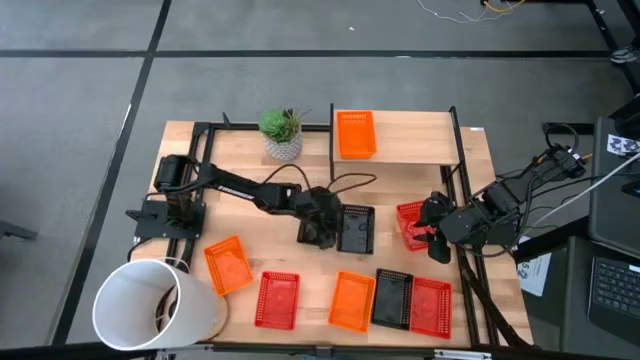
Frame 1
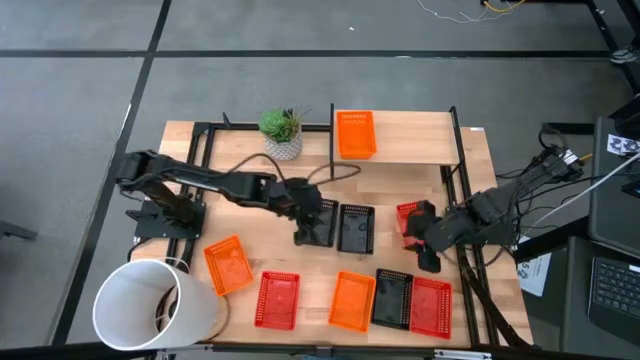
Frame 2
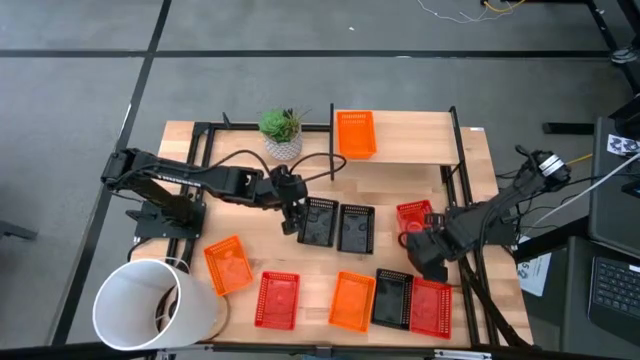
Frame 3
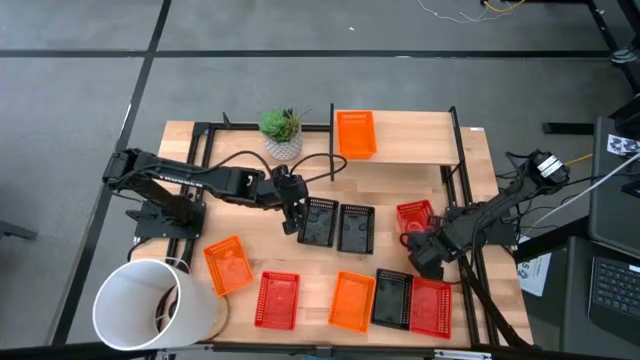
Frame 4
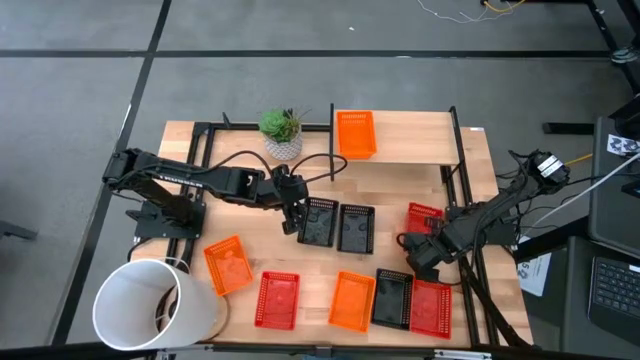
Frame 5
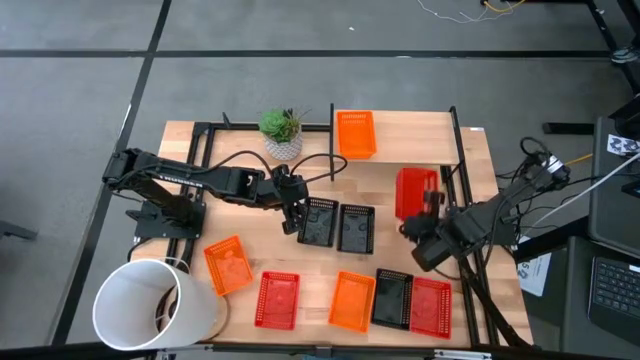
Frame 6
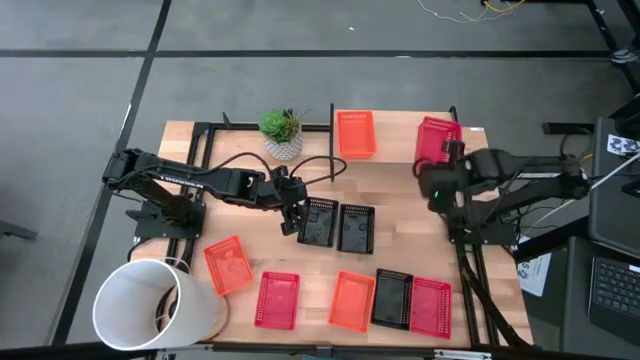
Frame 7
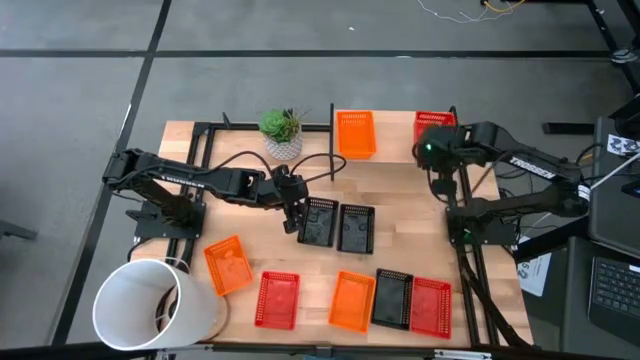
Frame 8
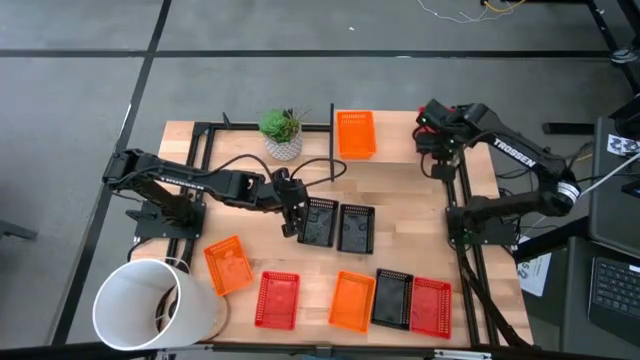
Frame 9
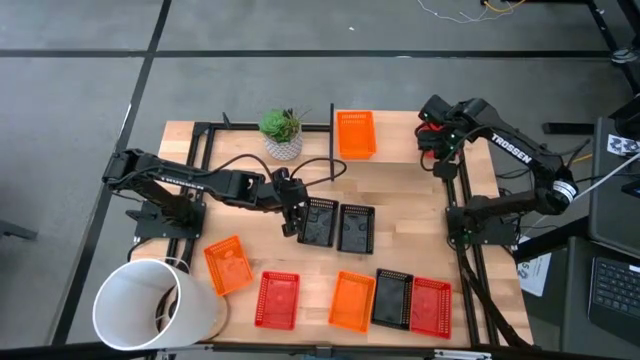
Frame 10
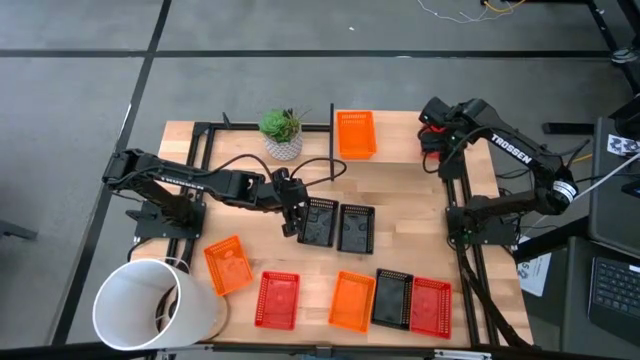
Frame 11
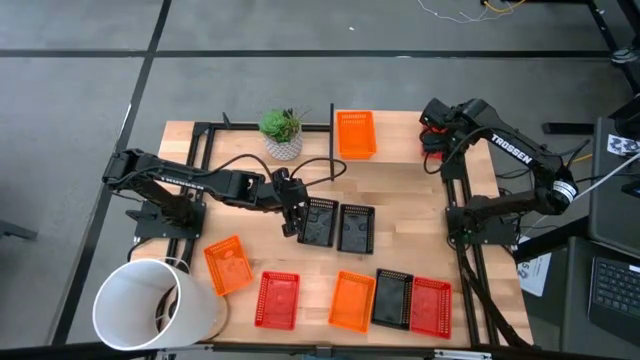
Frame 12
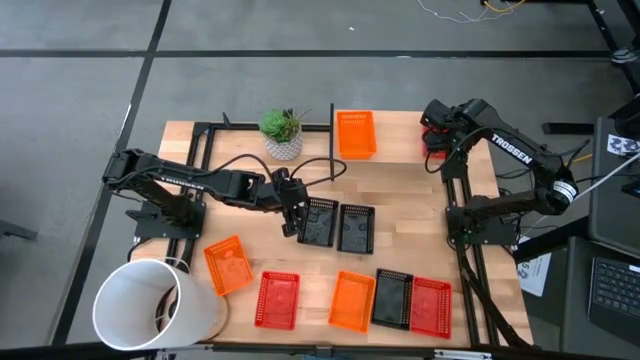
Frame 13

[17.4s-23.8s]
Task: Stack baskets on shelf by color
Put the top red bin on the shelf

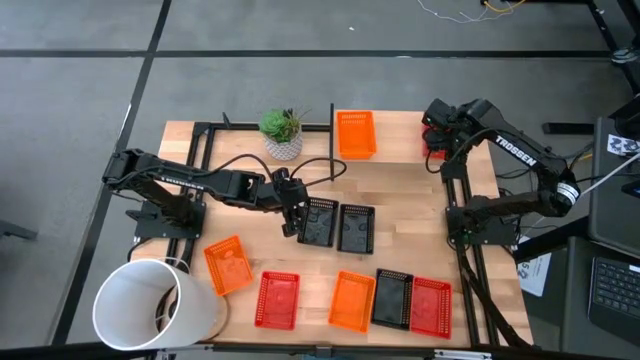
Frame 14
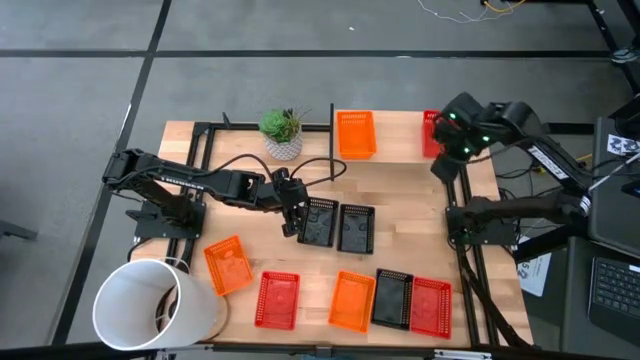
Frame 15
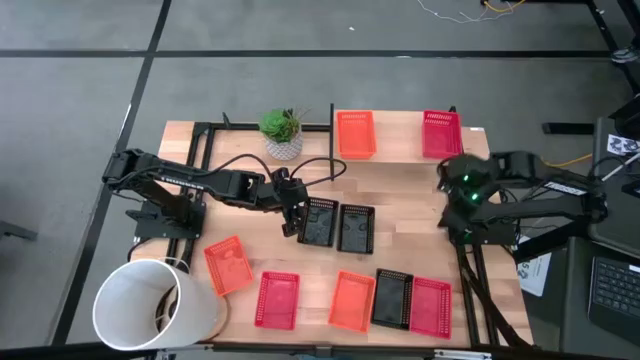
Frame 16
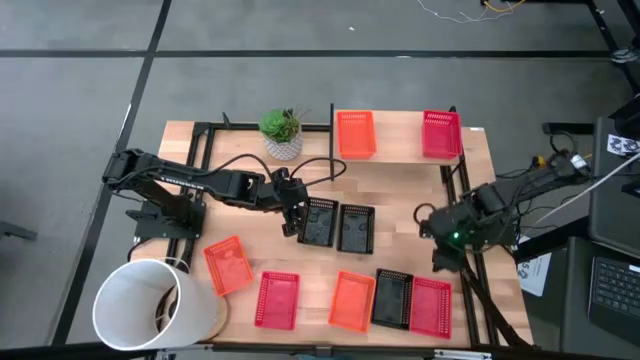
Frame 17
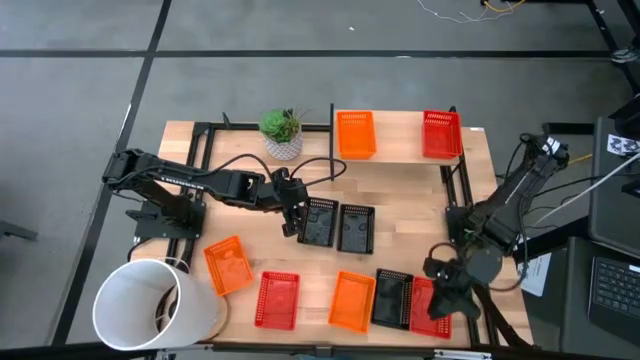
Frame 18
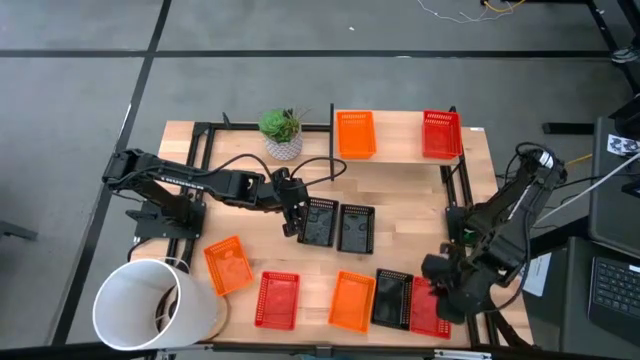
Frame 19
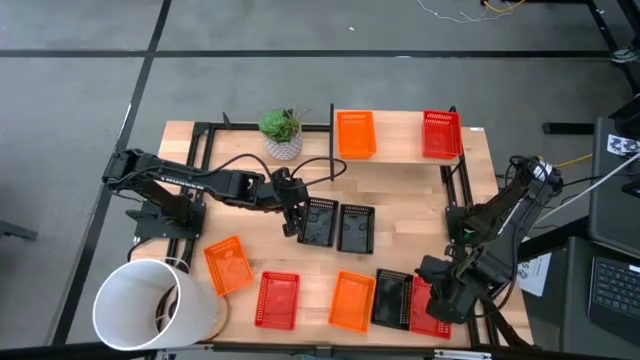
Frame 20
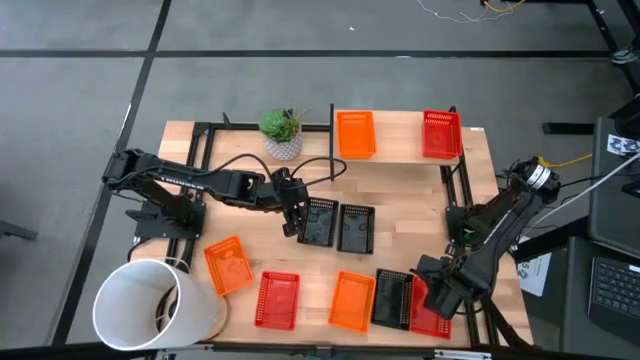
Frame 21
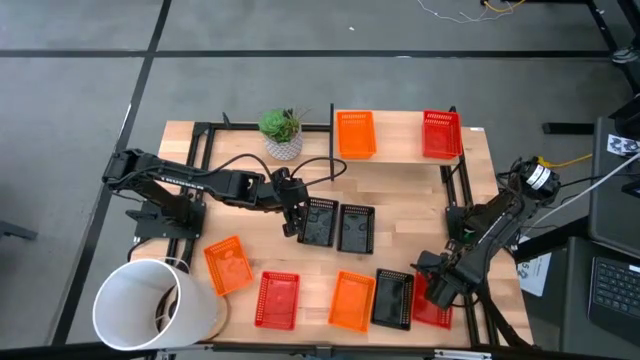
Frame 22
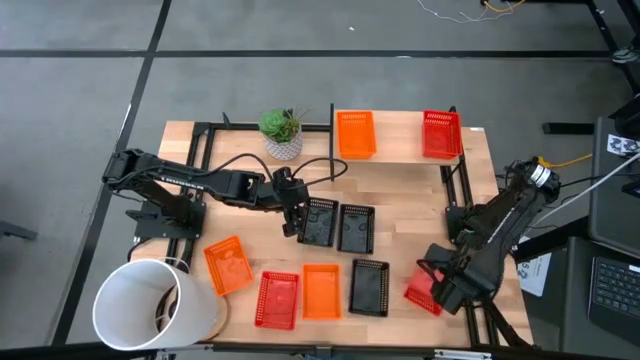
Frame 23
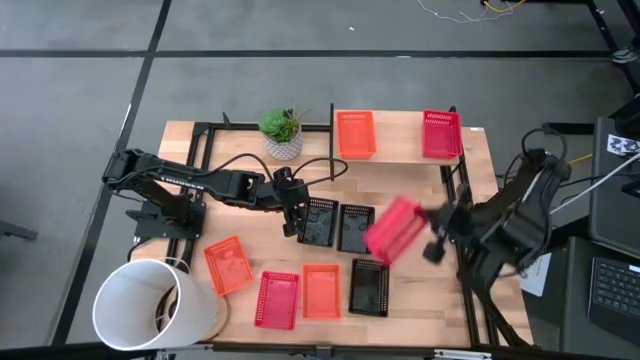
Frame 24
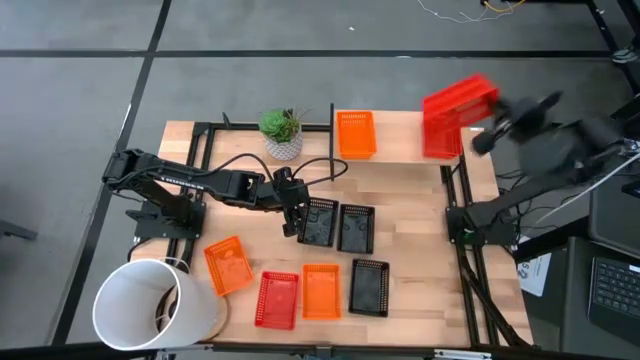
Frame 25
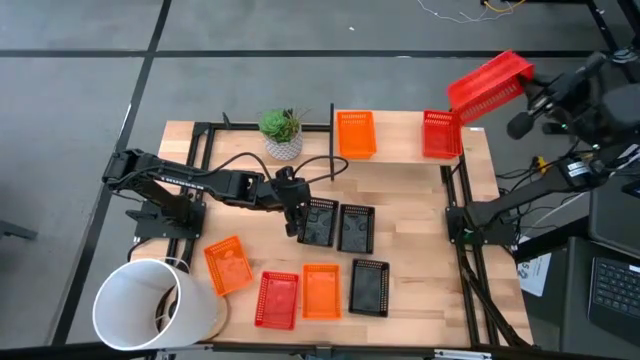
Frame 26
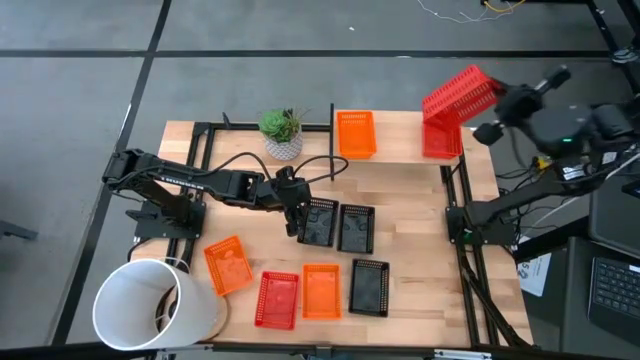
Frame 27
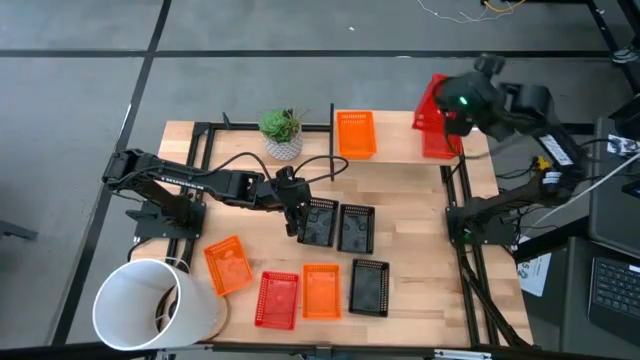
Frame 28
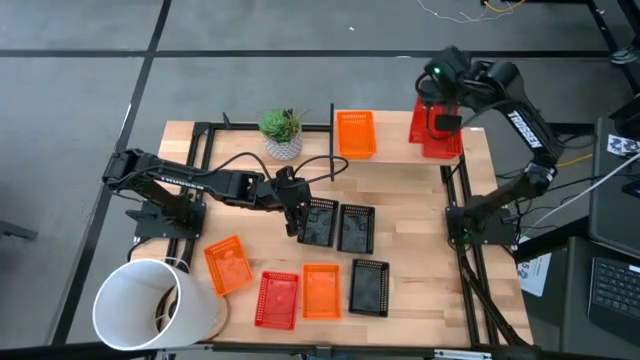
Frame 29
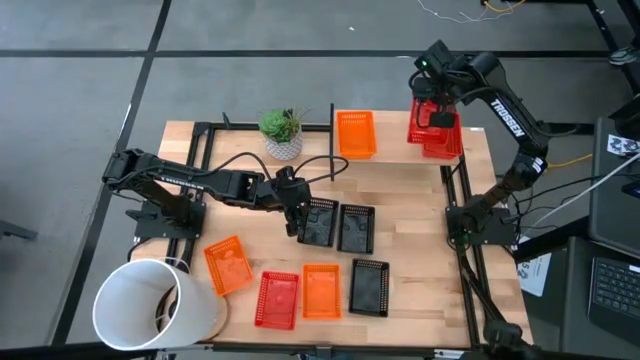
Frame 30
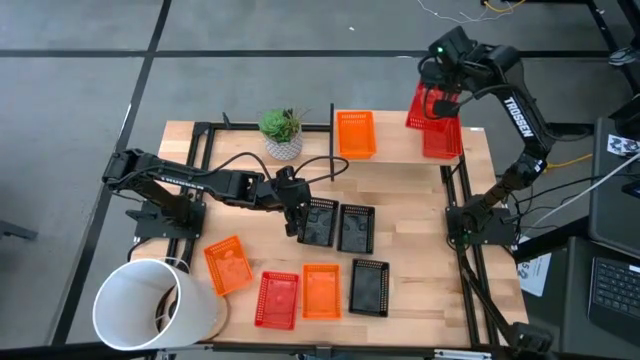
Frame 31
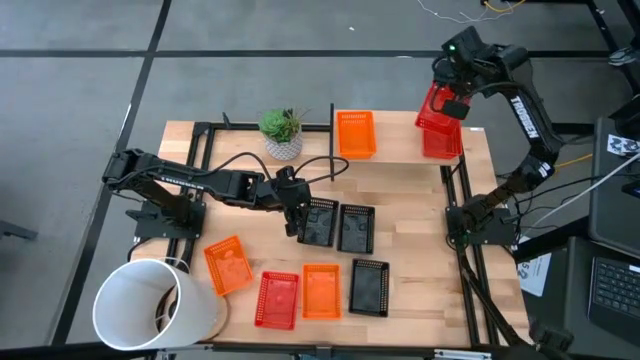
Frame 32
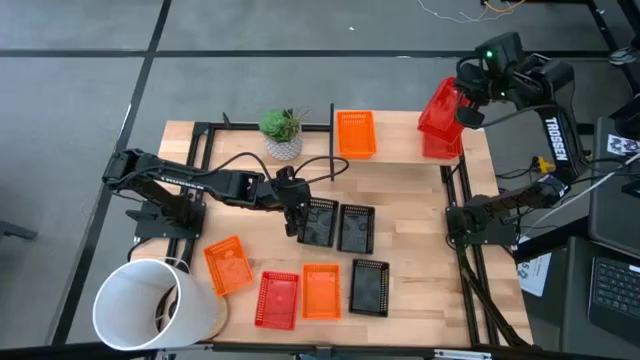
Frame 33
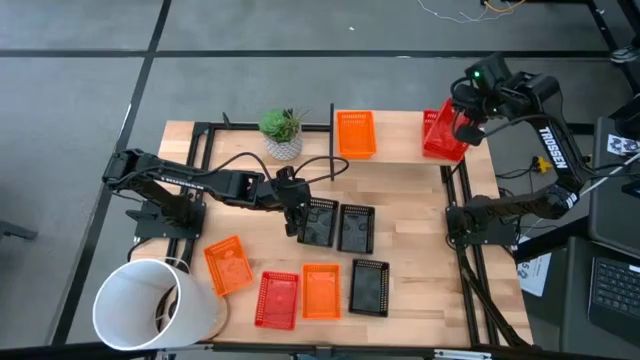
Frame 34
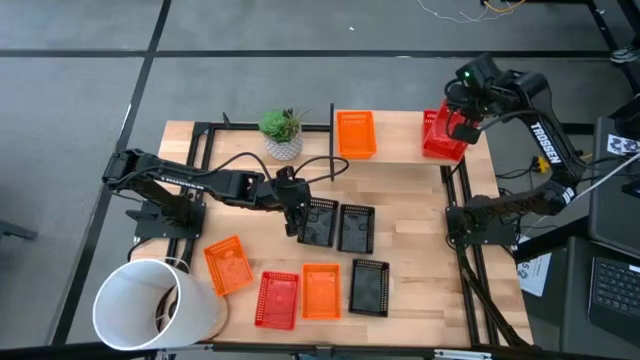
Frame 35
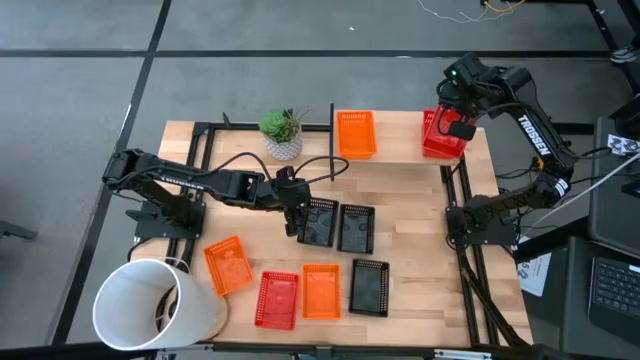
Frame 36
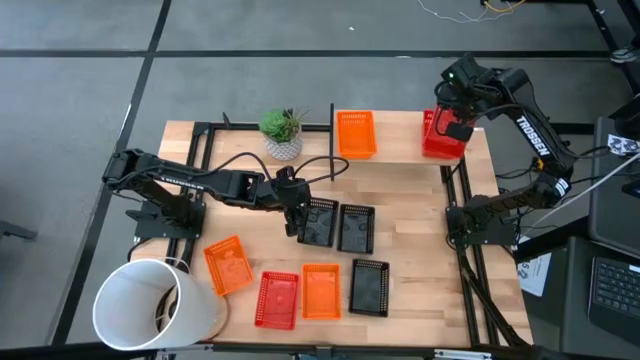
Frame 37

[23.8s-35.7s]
Stack the right red bin on top of the red bin on the shelf

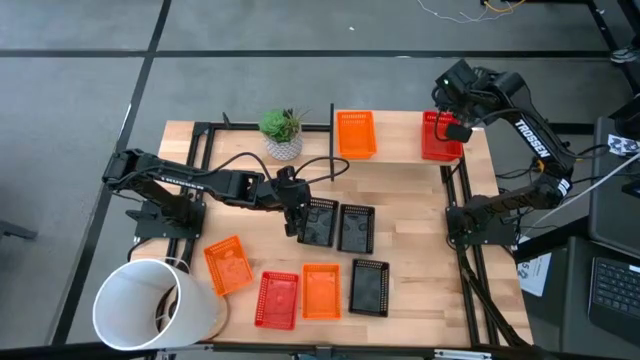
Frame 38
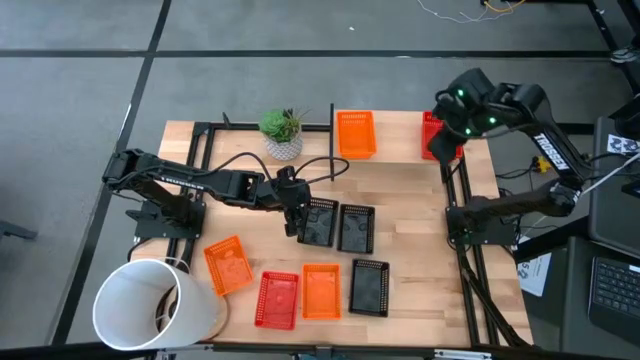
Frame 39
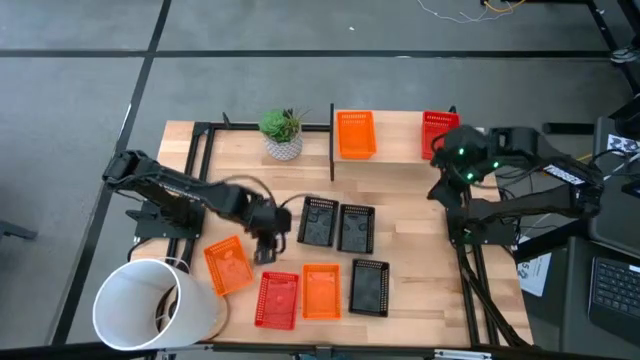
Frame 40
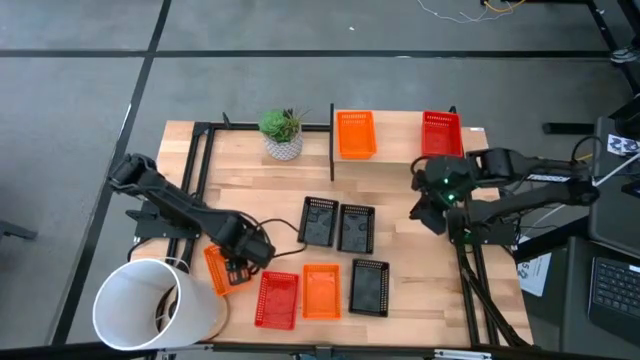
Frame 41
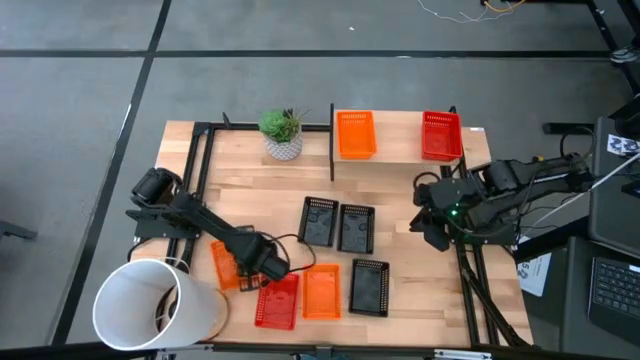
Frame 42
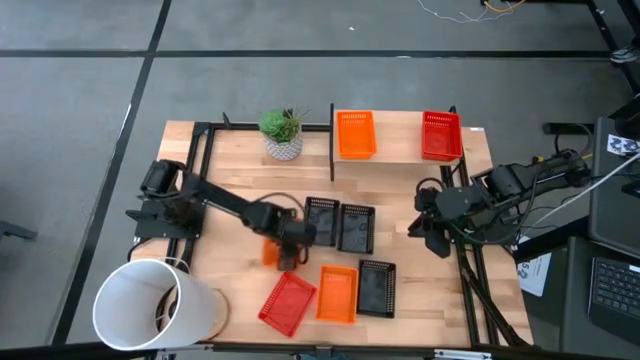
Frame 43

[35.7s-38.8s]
Move the left orange bin on the table

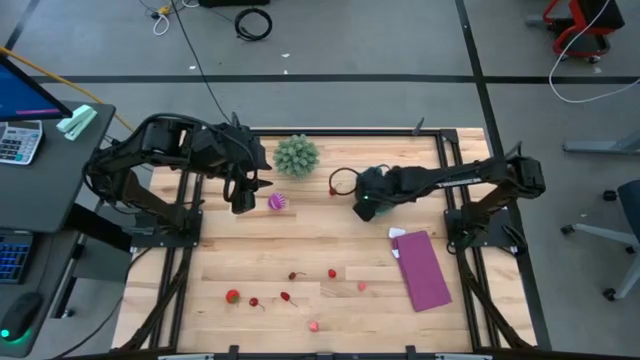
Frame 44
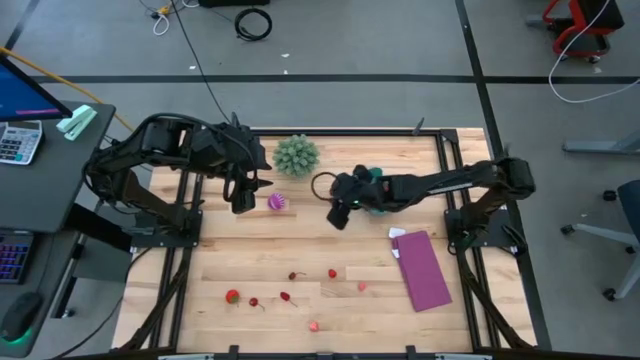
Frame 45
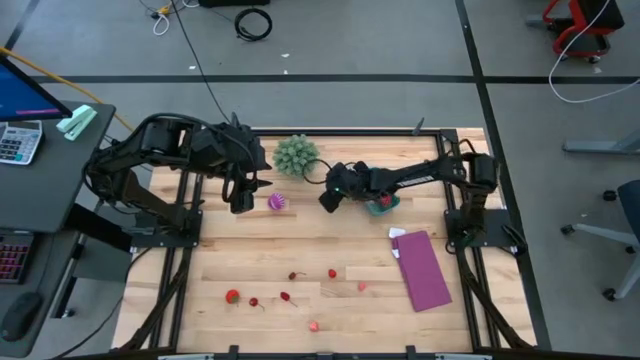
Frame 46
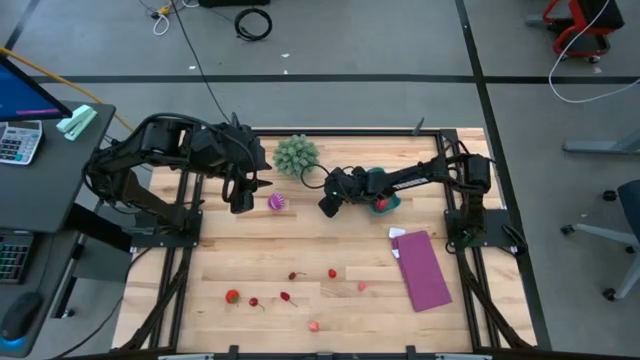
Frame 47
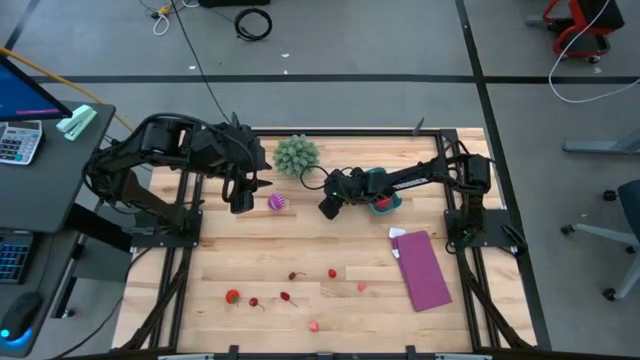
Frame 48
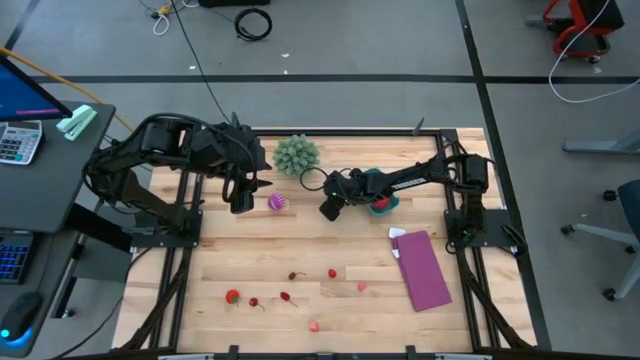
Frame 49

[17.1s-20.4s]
Task: Pick and placing Produce into tupperware
Put the red cherry into the blue bin
